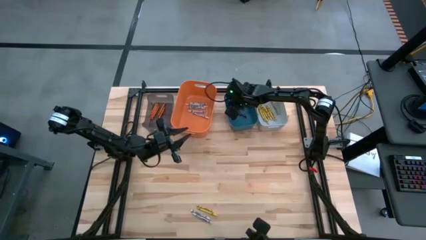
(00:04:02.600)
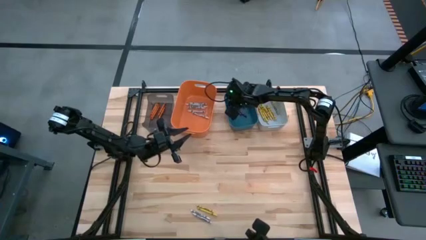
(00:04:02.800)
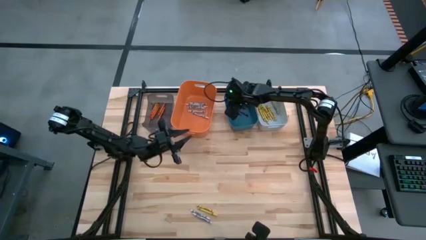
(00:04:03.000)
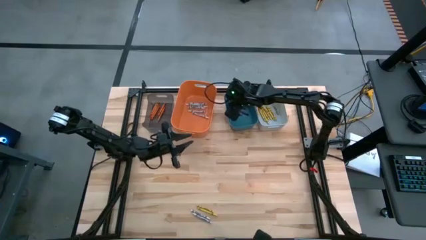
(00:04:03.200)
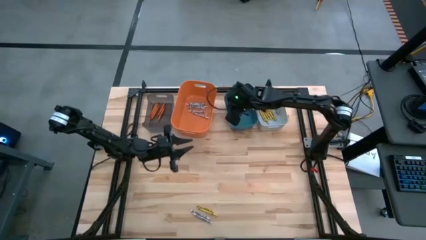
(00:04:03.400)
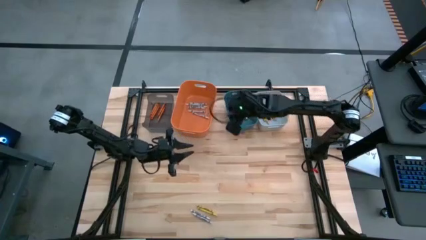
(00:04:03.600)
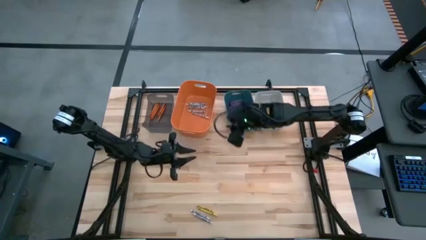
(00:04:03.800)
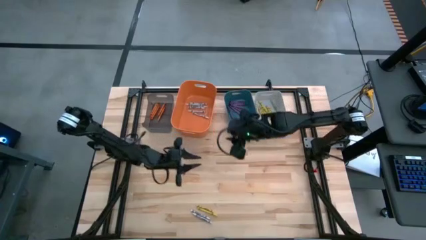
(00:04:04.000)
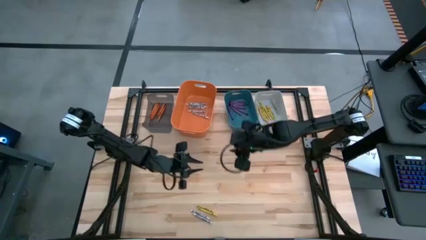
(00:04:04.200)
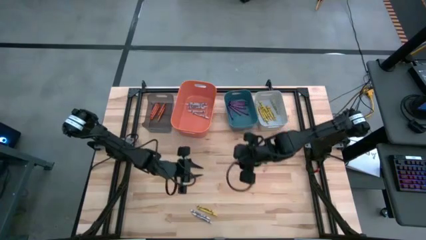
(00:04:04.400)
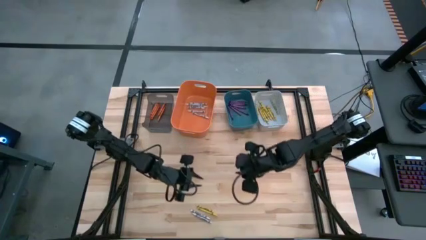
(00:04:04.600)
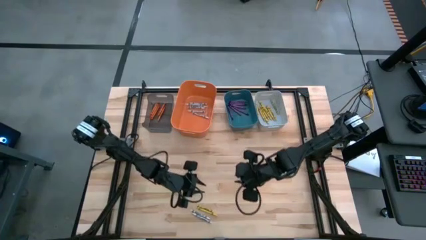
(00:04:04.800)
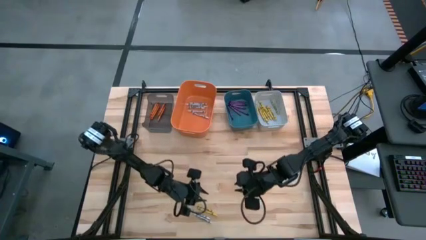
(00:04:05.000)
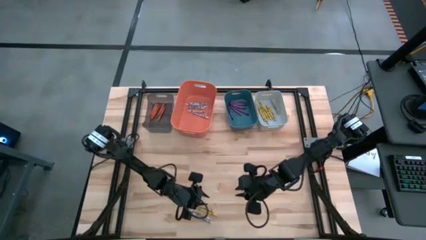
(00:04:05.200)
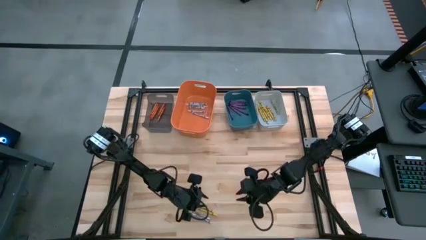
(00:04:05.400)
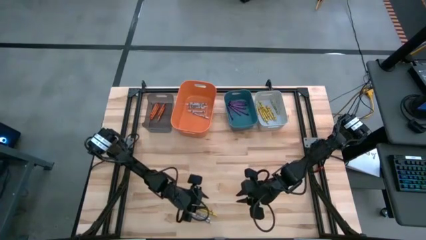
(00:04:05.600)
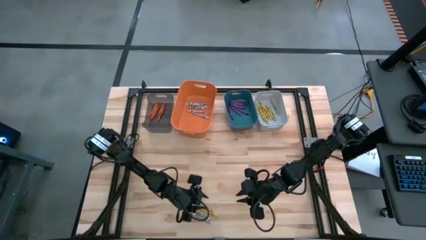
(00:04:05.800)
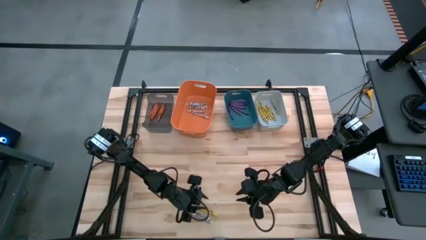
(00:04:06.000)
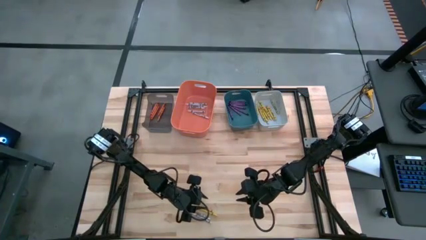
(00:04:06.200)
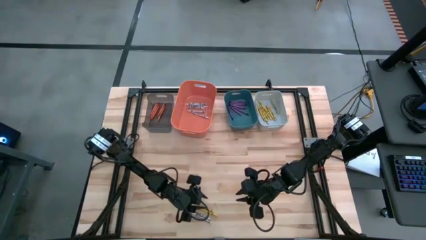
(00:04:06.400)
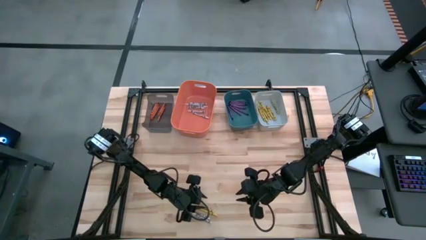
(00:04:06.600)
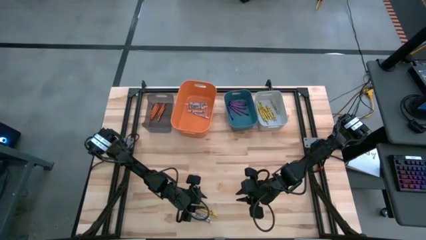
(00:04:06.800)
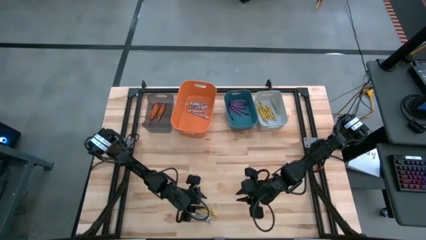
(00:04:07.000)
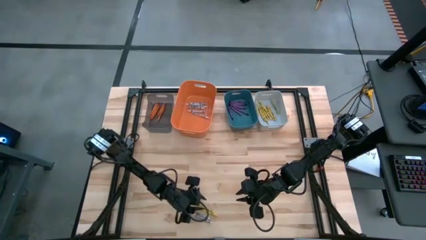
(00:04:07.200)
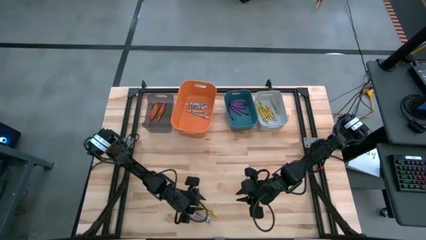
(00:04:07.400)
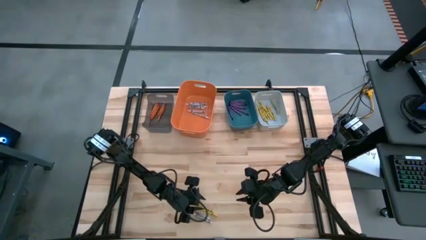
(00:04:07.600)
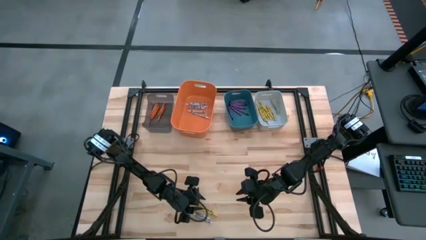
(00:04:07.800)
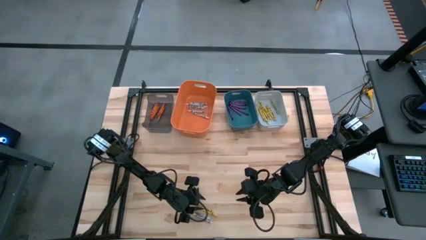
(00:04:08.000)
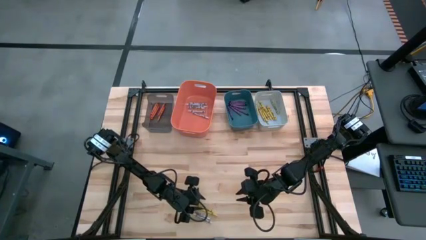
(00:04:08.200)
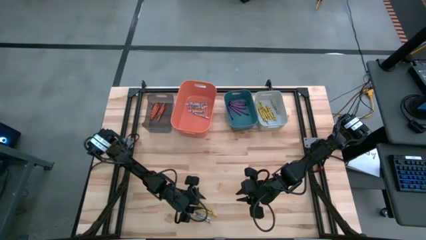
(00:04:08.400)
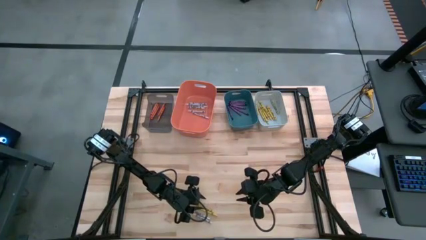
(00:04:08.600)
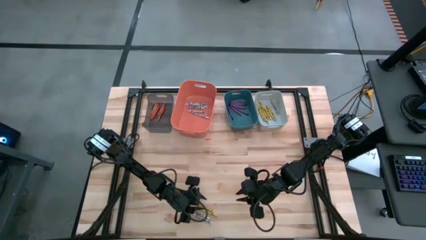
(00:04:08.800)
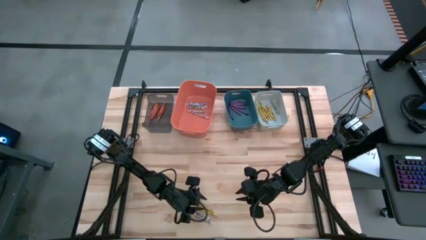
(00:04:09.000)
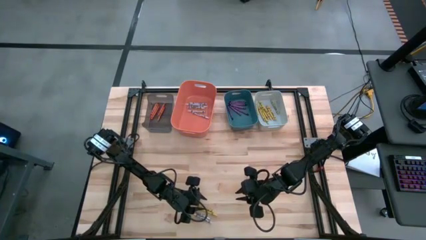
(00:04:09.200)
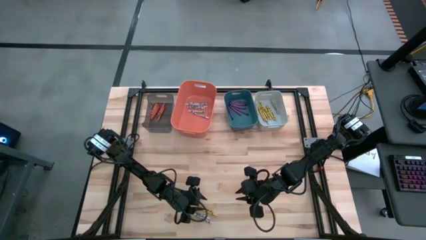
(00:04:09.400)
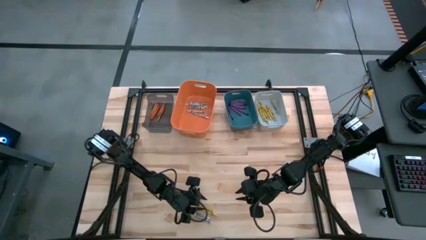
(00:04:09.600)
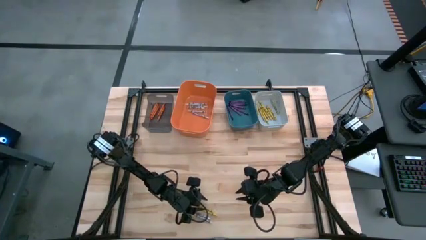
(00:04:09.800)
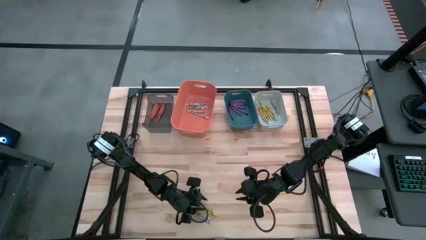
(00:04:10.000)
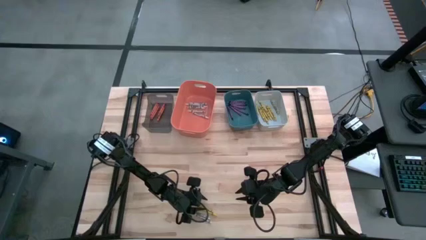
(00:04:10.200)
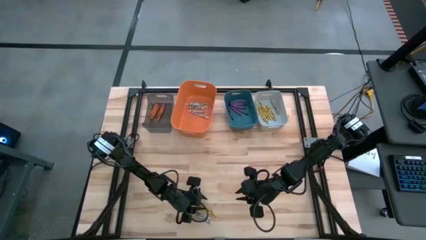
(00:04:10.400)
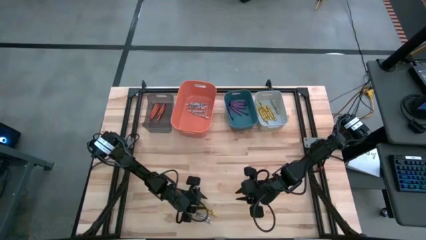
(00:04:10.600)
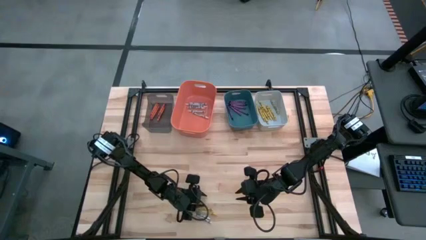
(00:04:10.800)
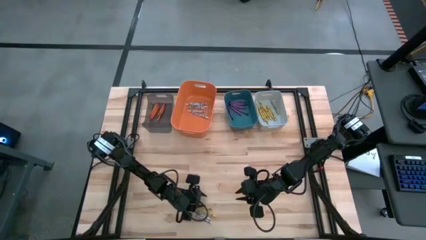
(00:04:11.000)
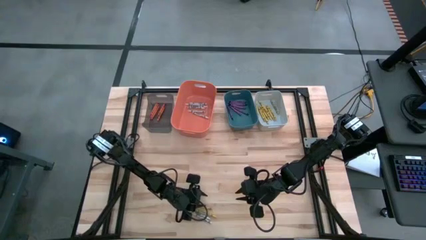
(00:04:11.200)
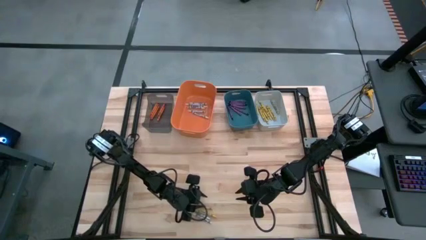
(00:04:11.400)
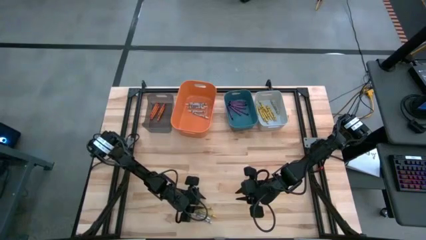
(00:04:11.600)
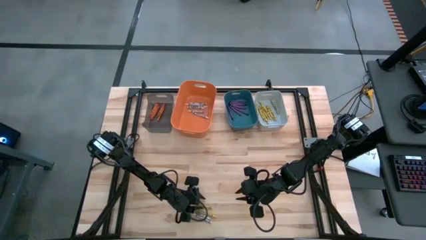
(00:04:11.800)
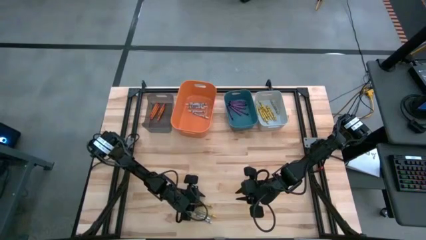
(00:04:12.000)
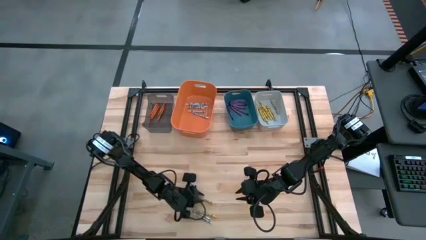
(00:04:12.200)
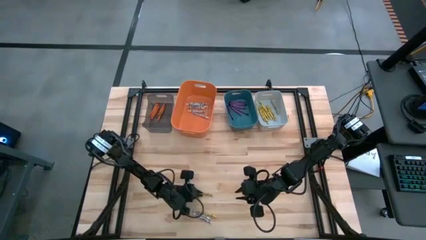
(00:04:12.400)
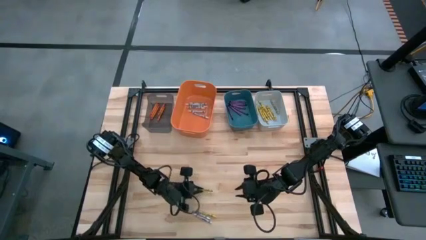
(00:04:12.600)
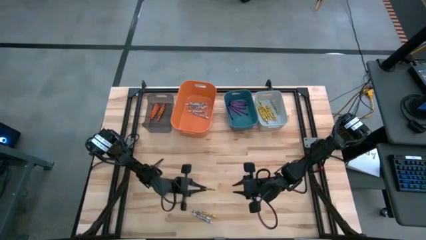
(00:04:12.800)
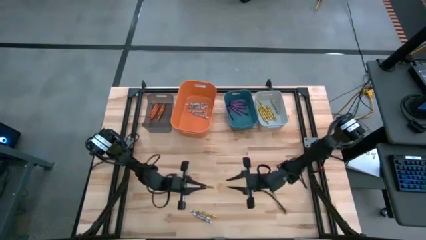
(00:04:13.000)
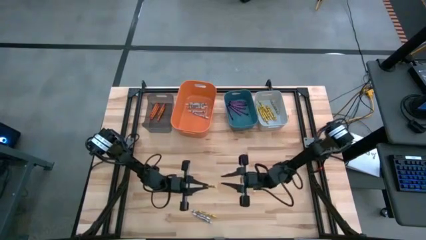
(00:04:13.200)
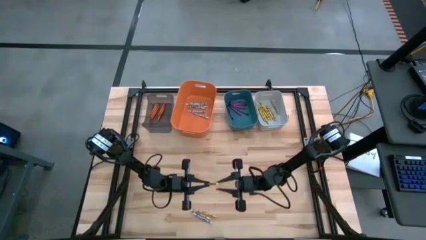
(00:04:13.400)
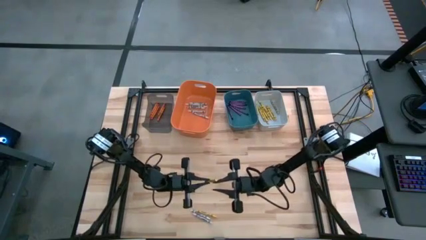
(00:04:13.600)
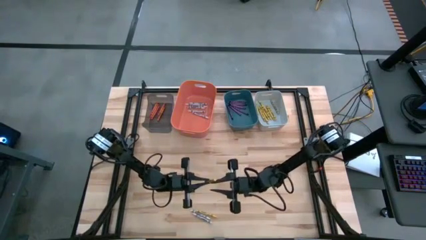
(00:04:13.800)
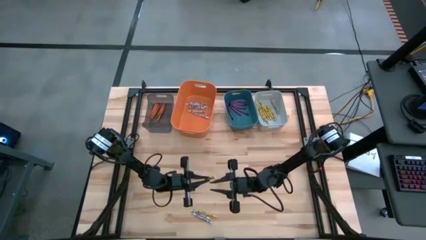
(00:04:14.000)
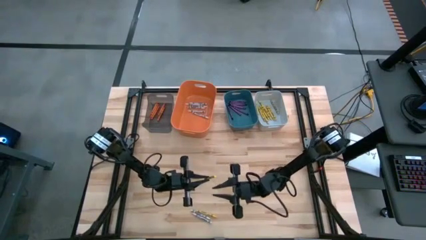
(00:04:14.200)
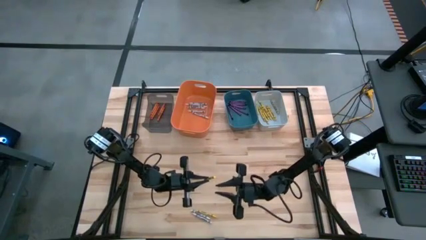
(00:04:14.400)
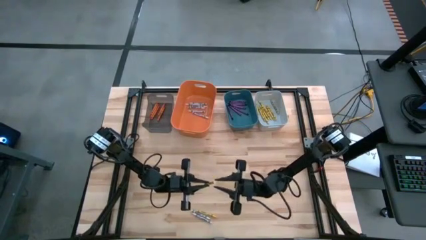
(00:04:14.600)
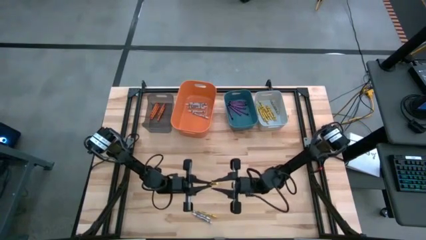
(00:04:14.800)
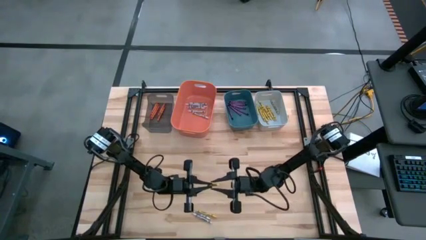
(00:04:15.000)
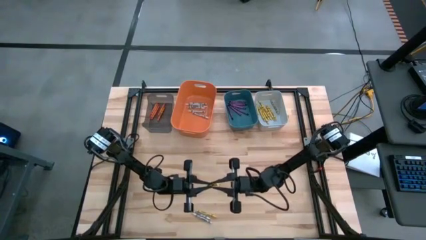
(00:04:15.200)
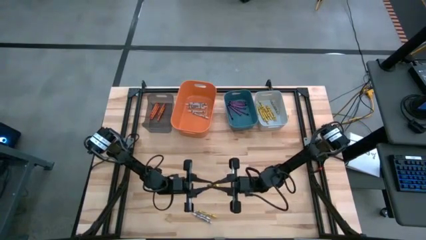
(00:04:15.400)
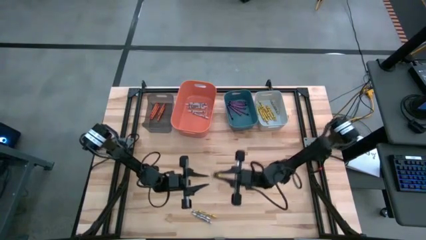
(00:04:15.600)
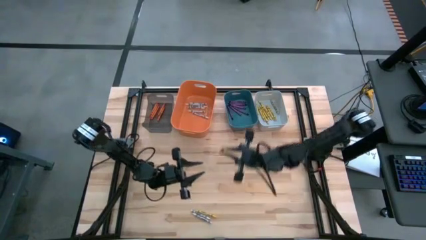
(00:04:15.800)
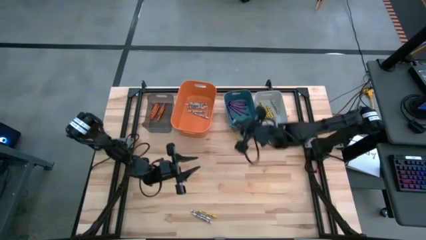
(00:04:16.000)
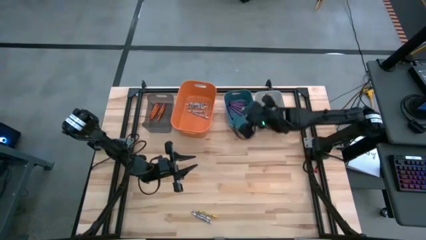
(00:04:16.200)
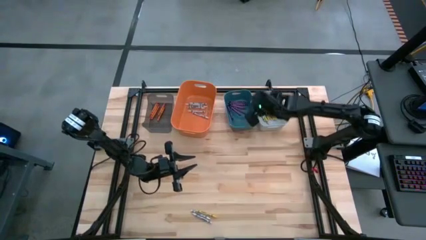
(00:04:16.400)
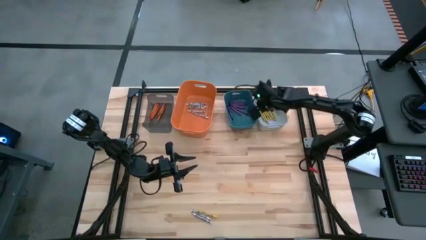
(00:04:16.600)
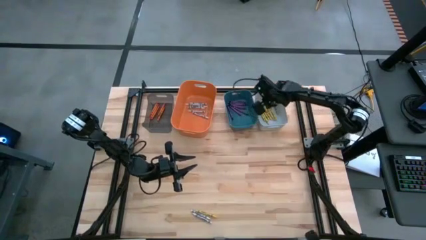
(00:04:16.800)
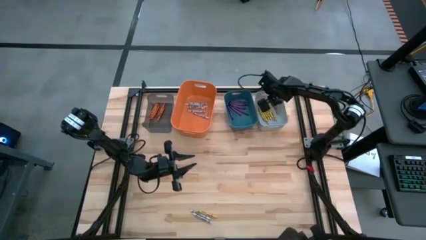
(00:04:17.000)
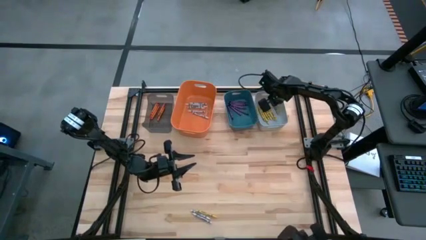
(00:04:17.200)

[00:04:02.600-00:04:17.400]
Task: Sort crayons
Put the yellow crayon into the white bin
